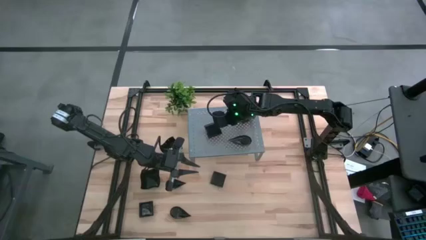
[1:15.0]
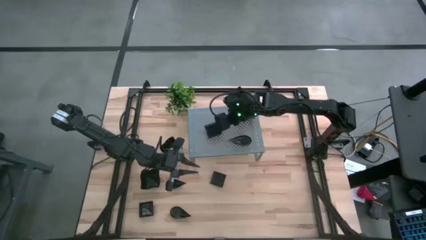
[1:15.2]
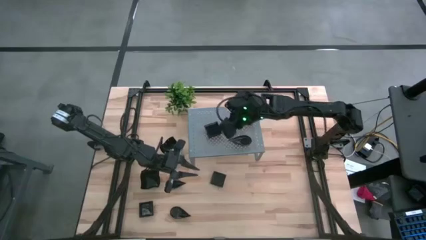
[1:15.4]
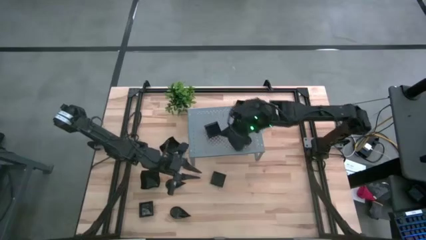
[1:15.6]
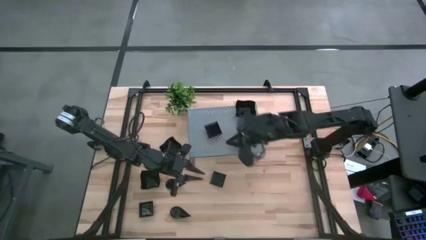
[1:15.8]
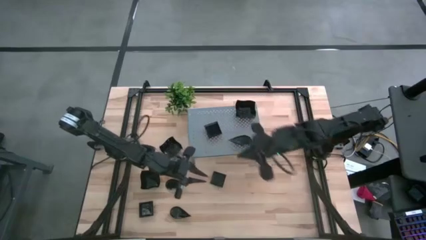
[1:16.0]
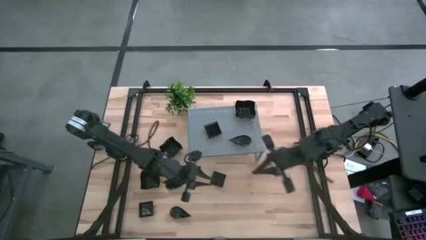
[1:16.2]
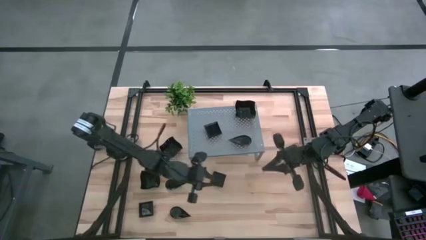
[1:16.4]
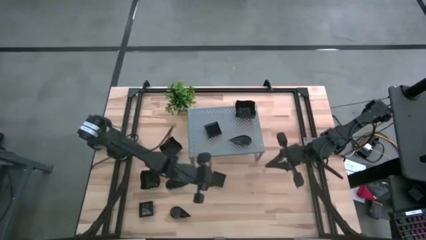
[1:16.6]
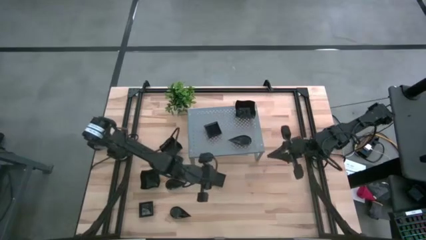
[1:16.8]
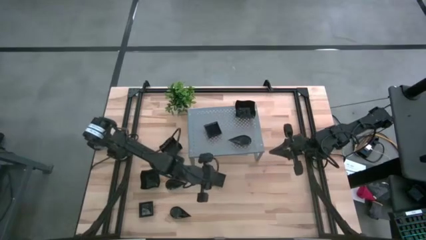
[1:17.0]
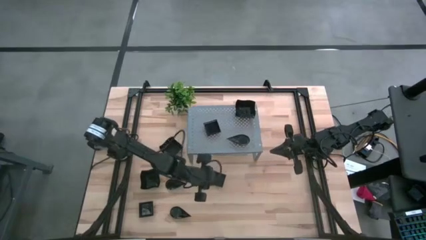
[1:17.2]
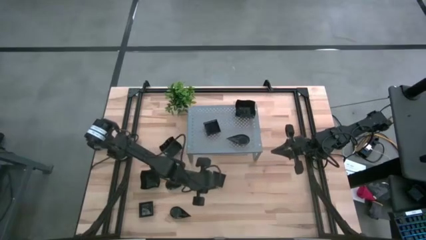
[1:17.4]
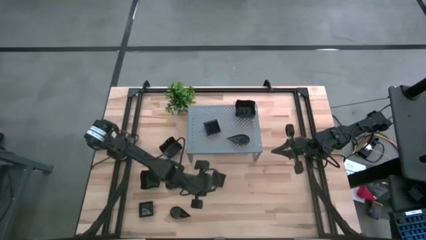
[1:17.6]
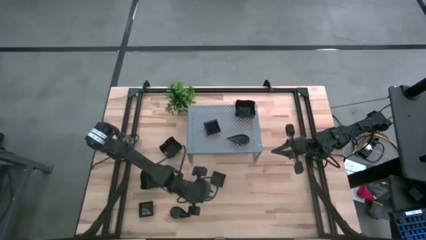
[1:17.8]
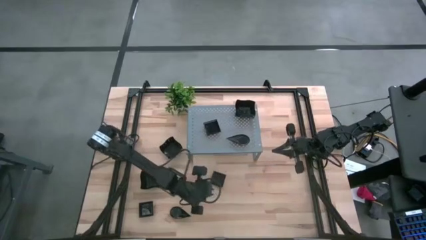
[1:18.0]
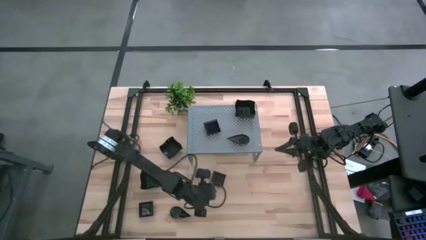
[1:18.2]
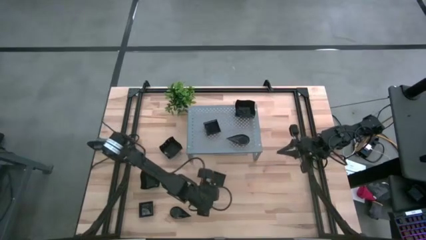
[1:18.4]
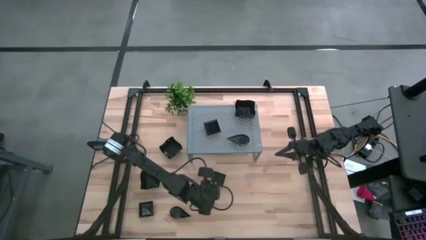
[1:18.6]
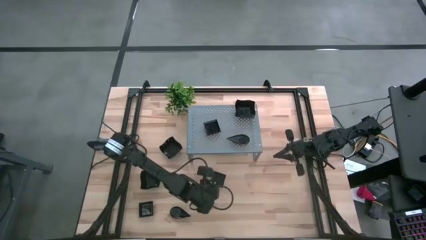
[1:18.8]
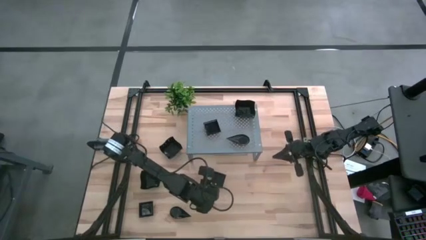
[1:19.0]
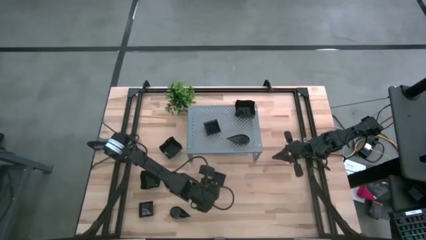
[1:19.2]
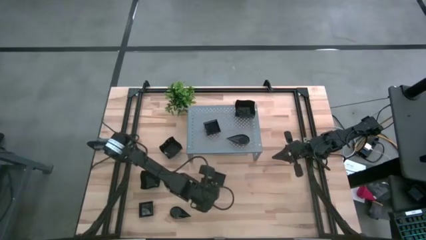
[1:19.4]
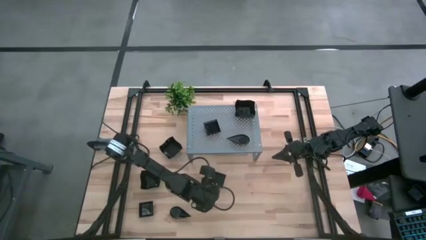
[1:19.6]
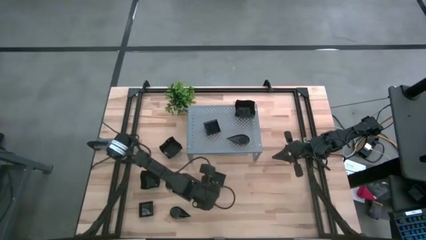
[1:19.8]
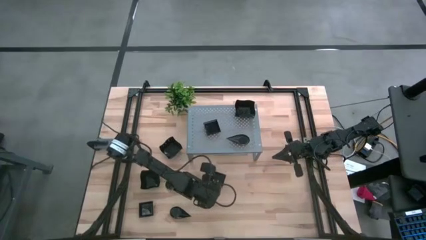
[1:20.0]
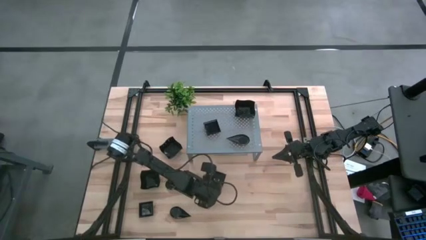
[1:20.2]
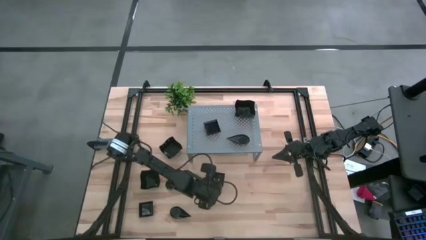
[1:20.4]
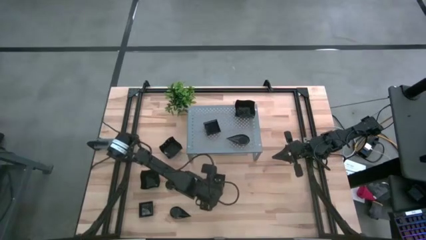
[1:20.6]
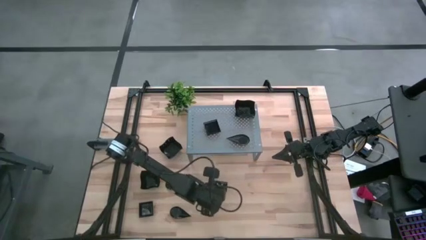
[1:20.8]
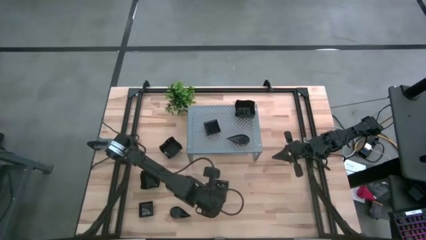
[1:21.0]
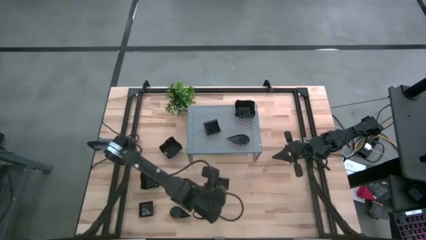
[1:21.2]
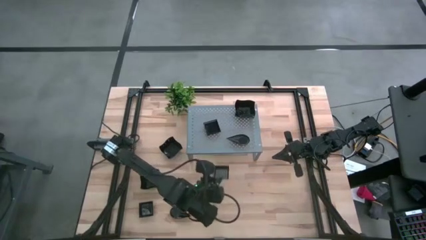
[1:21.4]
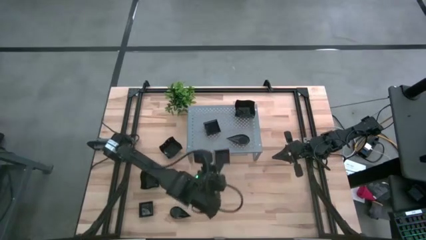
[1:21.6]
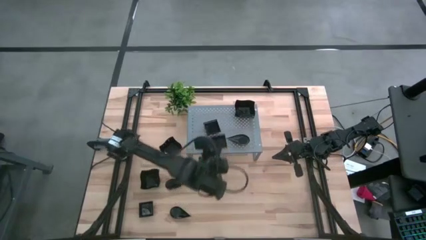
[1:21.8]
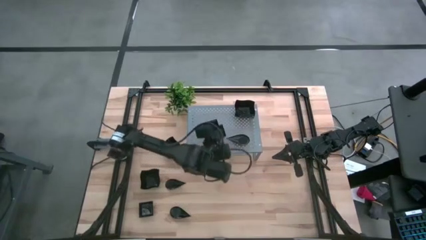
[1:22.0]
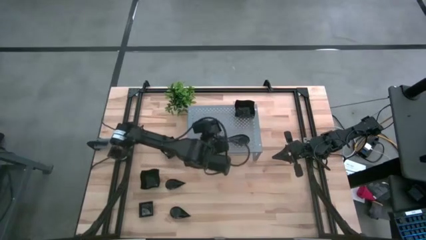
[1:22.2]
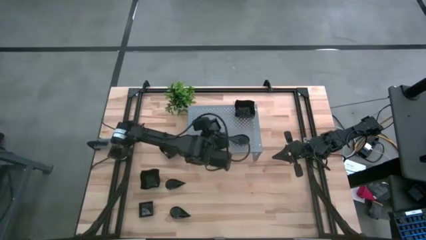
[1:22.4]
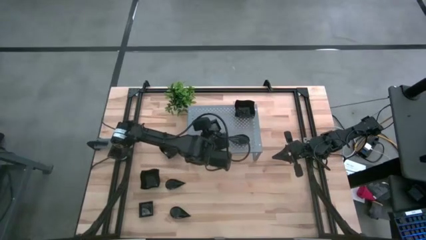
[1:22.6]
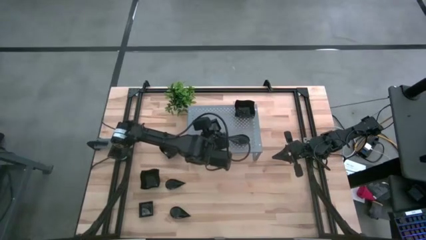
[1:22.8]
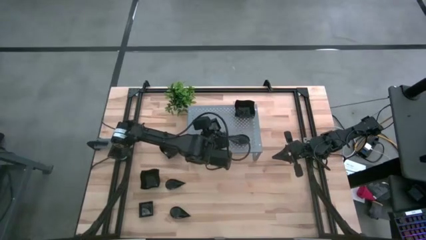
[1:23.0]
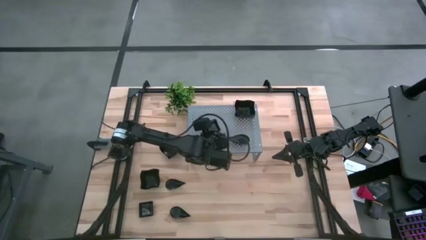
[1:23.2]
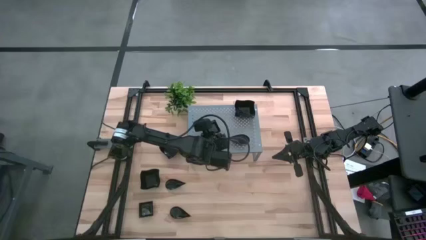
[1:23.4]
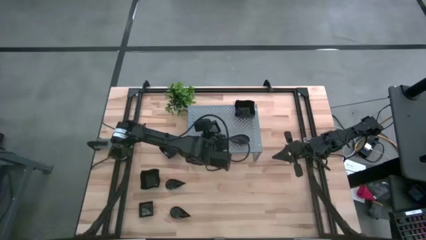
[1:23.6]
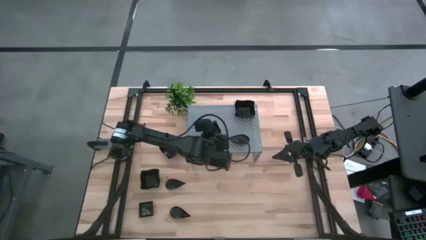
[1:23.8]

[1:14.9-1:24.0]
Task: Pick & Place Mini shaped plates
Stack the black square plate on top of the black square plate on the shelf

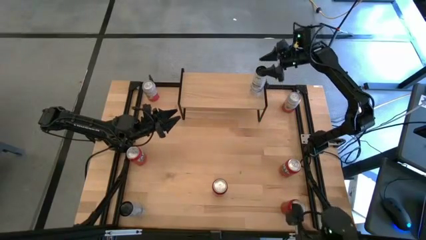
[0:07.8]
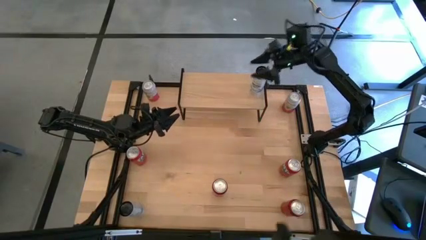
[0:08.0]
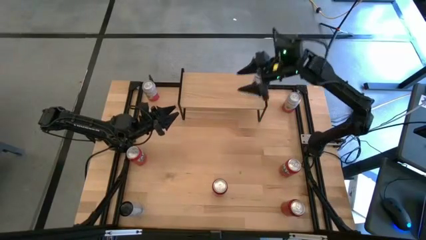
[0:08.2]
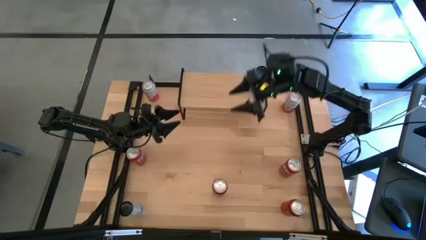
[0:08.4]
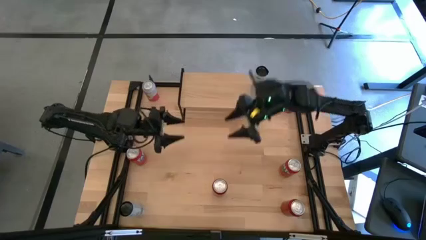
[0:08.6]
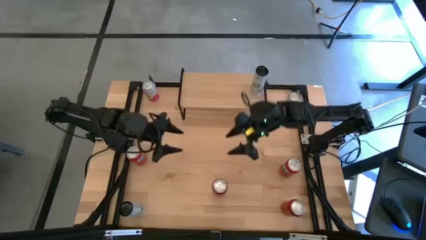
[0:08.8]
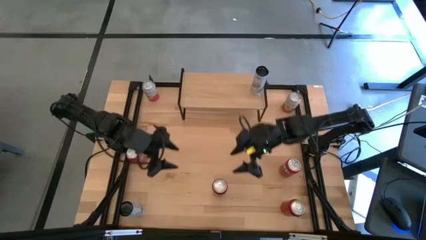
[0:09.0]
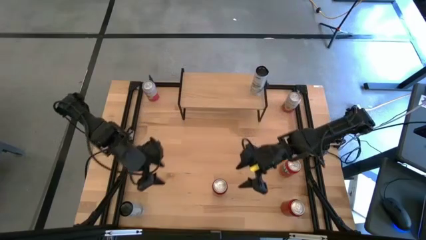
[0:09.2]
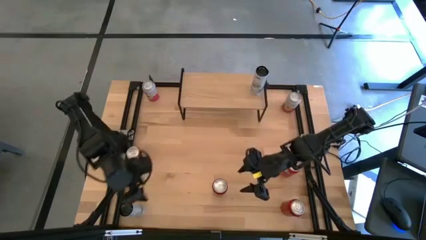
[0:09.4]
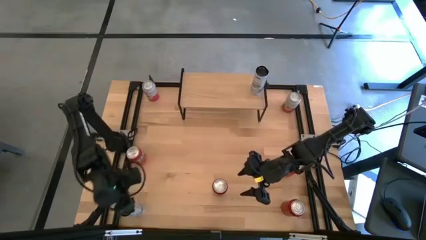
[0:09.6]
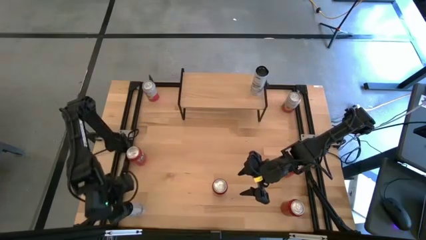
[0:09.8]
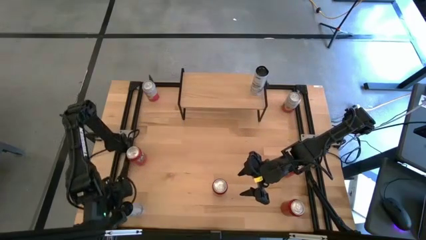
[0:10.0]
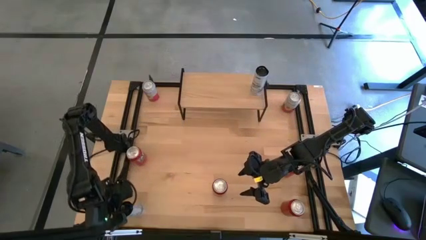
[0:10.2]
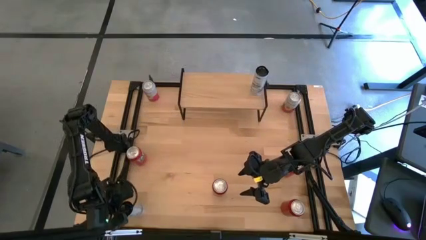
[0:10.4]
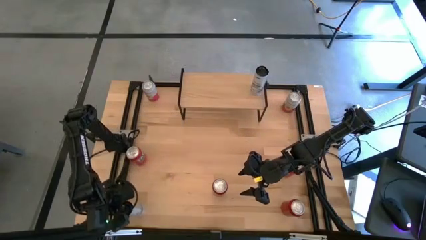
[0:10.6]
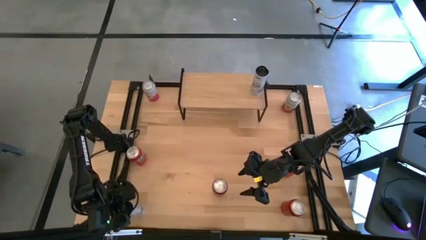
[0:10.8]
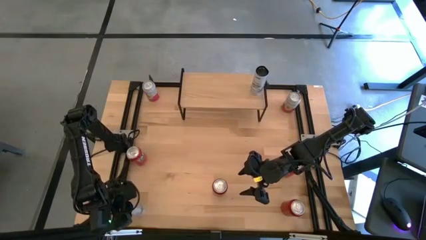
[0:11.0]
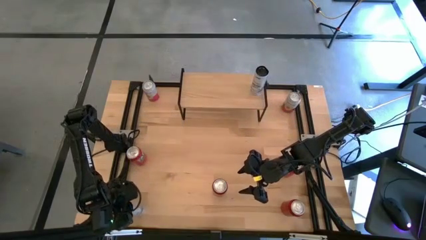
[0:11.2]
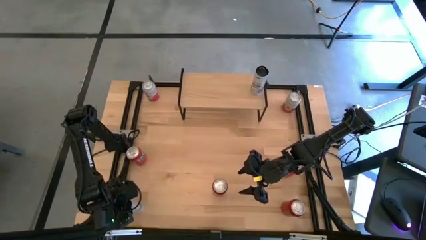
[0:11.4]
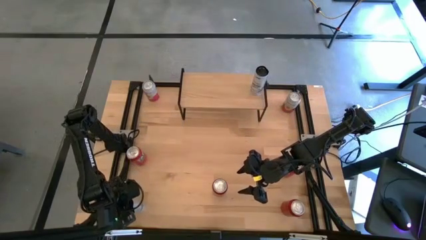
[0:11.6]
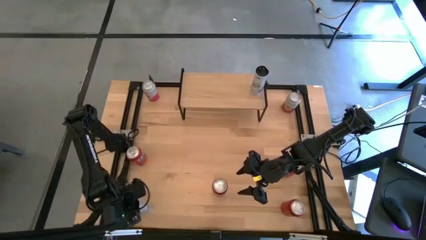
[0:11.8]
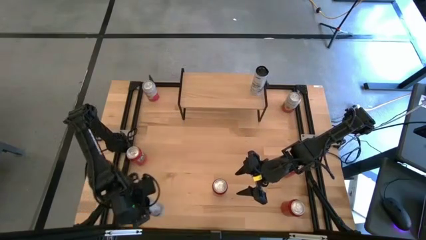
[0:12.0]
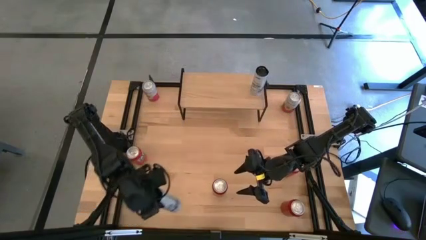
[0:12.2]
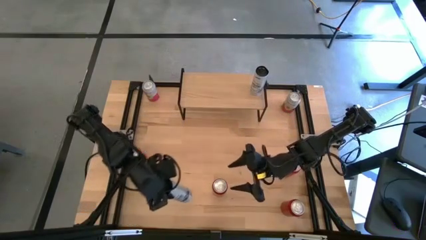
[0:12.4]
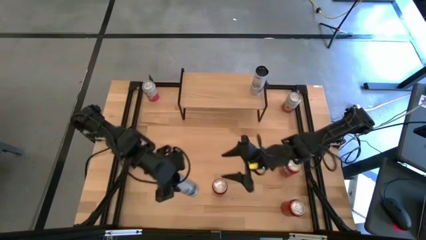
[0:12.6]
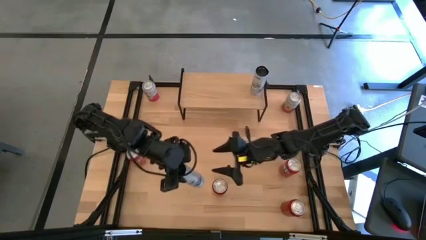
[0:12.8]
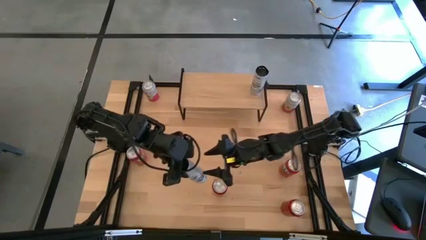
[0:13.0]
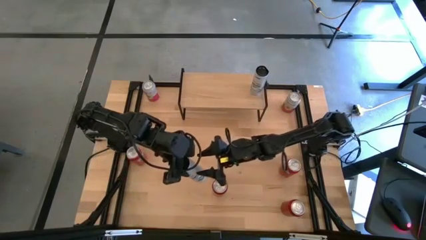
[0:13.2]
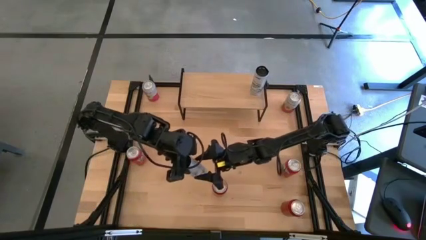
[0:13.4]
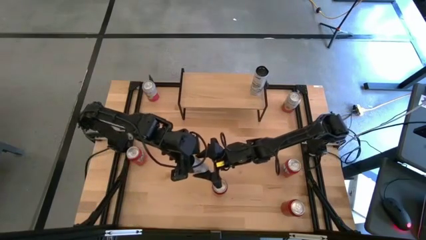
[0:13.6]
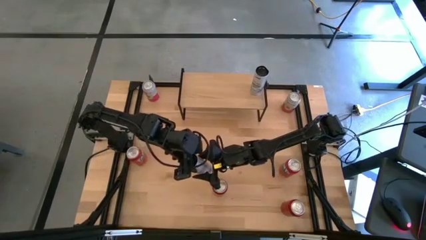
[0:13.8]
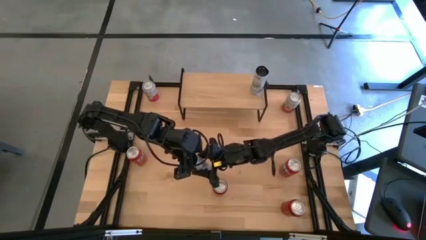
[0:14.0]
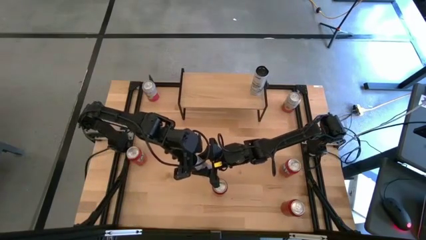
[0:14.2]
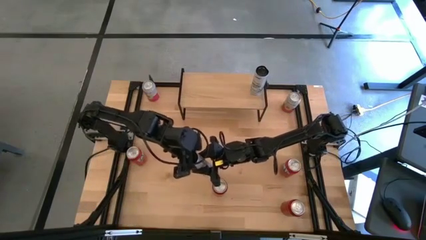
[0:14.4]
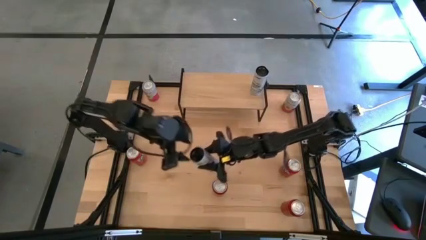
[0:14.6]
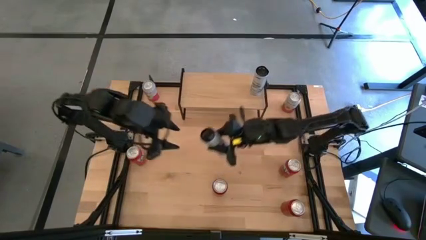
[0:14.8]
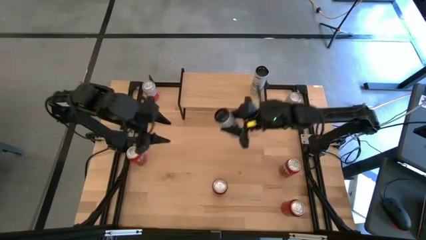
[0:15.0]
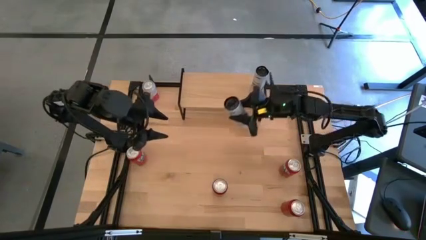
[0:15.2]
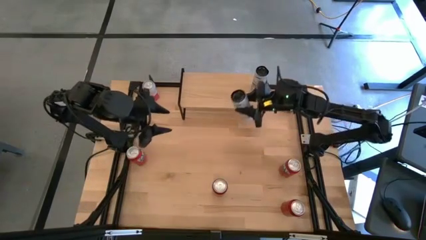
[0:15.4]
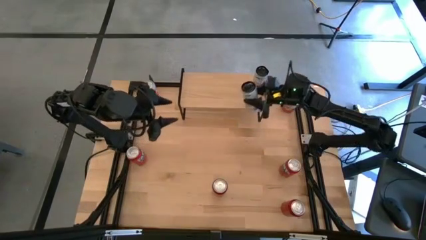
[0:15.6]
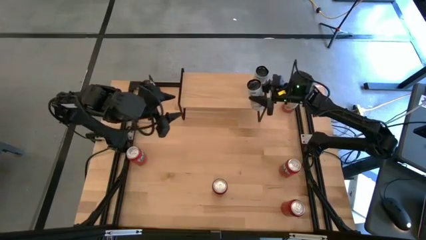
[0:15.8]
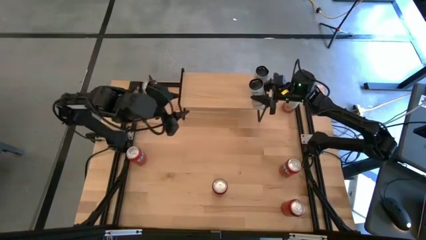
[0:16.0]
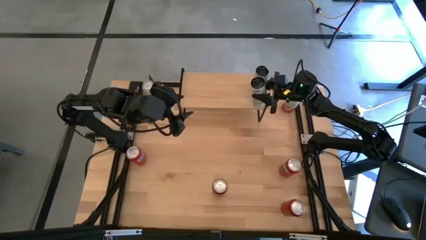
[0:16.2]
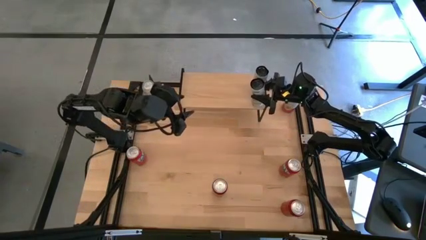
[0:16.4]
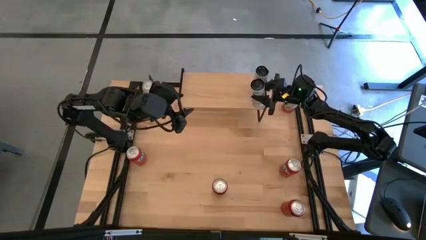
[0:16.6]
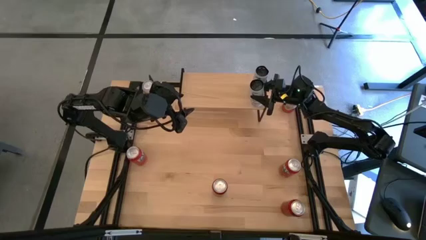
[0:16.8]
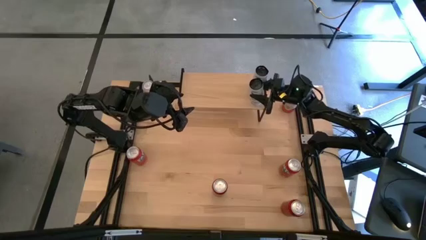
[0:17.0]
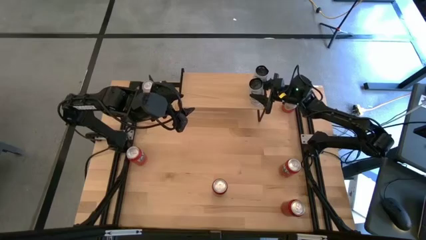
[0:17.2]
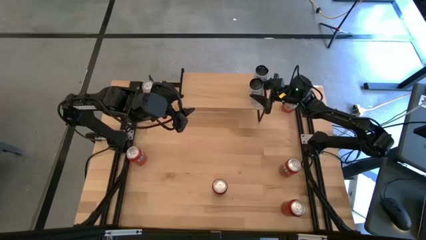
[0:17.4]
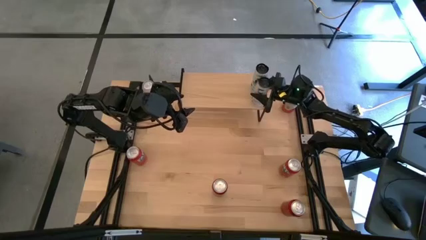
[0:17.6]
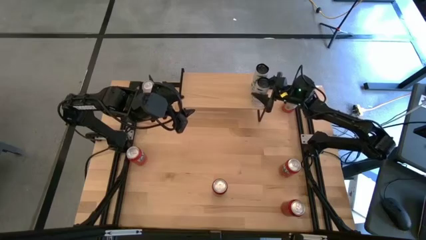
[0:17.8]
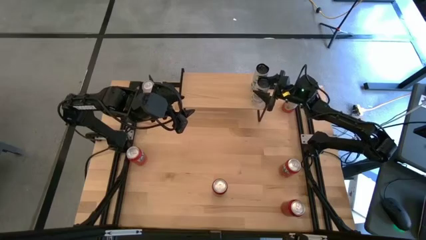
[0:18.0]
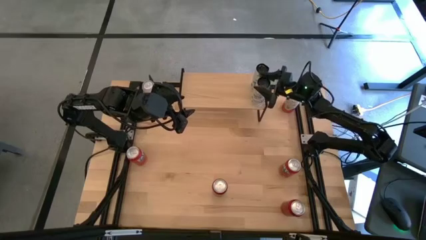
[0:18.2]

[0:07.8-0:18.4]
Task: Place canned beverage on shelf
Put the white-blue soda can on the shelf aligned with the other white-blue soda can
